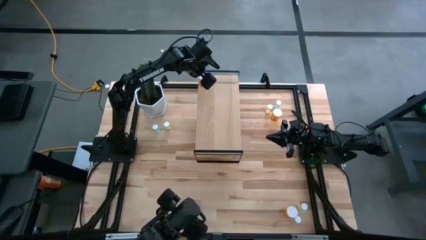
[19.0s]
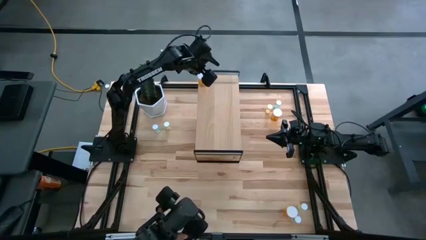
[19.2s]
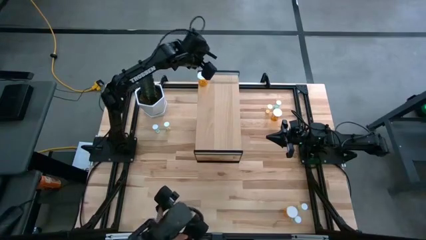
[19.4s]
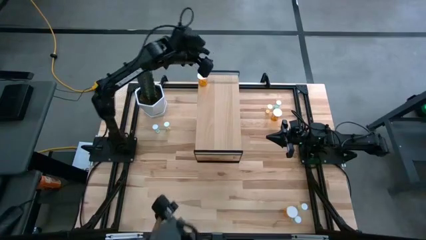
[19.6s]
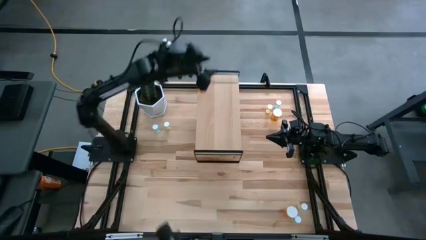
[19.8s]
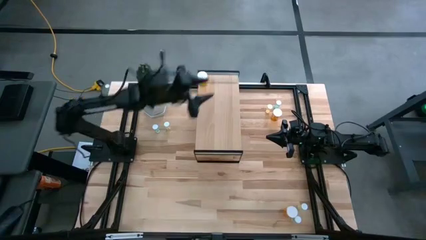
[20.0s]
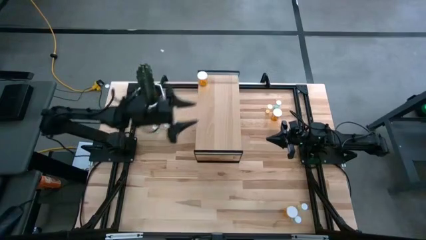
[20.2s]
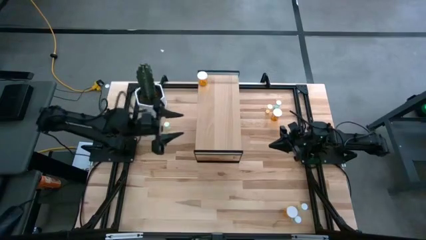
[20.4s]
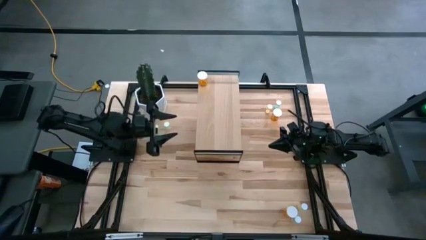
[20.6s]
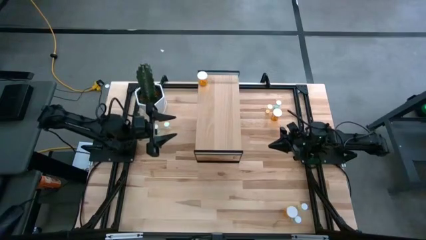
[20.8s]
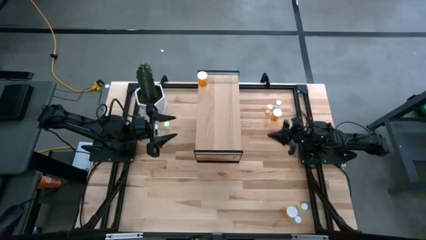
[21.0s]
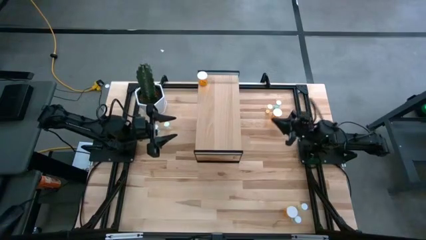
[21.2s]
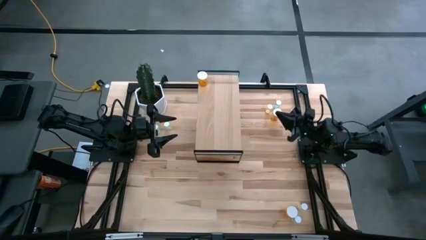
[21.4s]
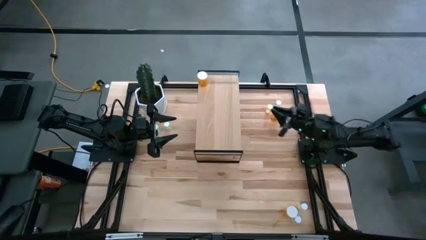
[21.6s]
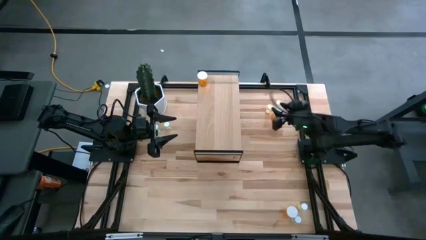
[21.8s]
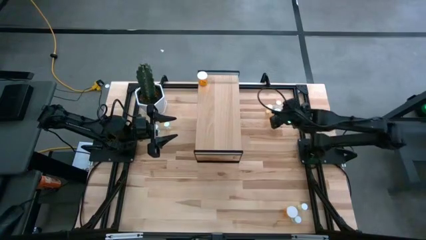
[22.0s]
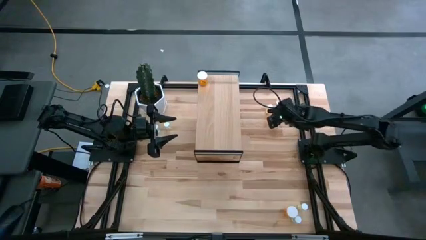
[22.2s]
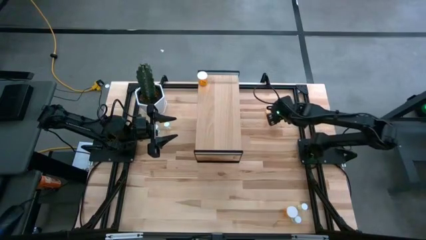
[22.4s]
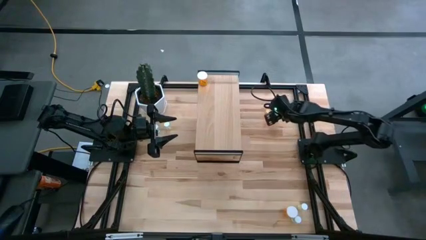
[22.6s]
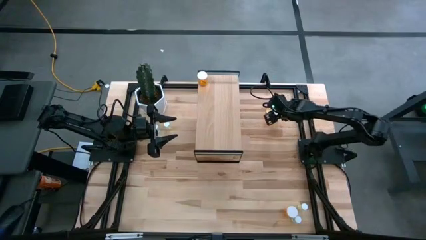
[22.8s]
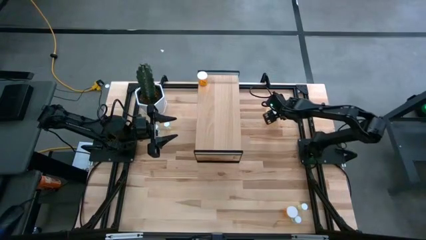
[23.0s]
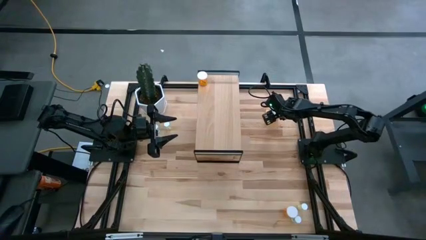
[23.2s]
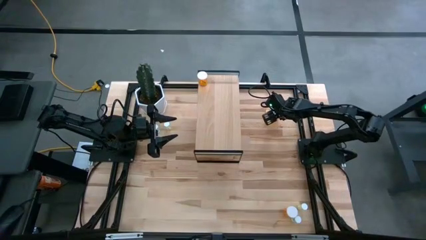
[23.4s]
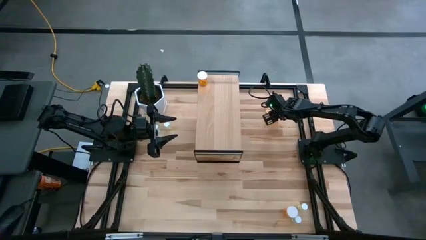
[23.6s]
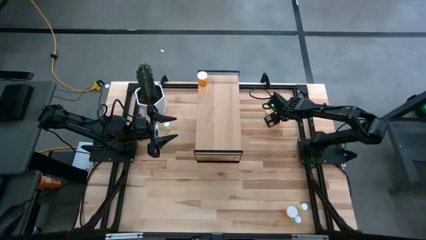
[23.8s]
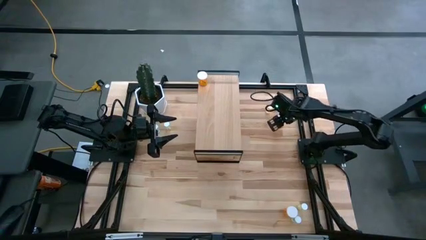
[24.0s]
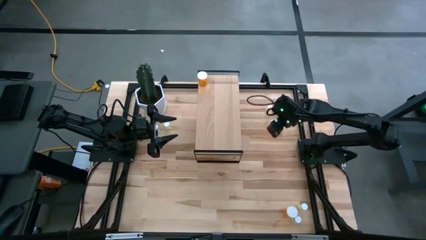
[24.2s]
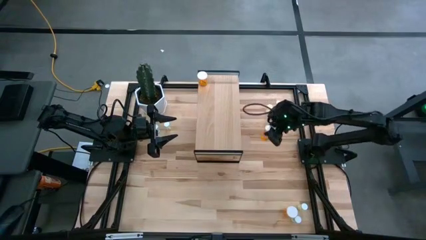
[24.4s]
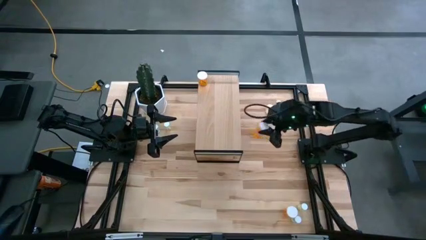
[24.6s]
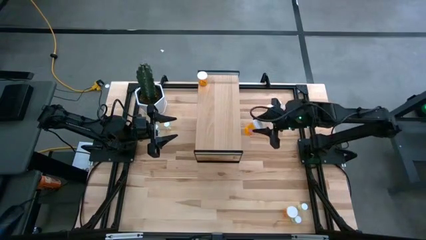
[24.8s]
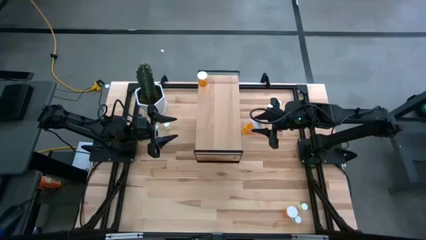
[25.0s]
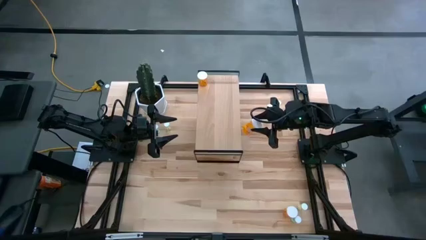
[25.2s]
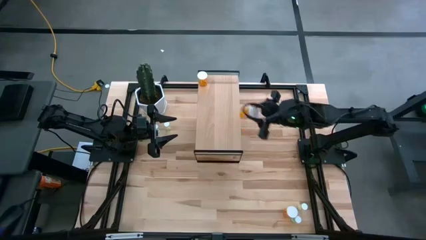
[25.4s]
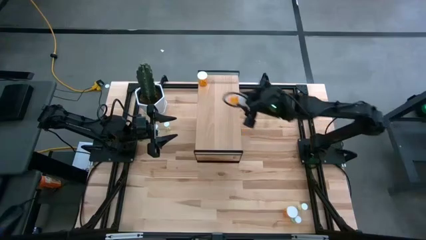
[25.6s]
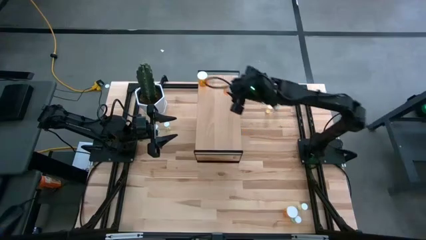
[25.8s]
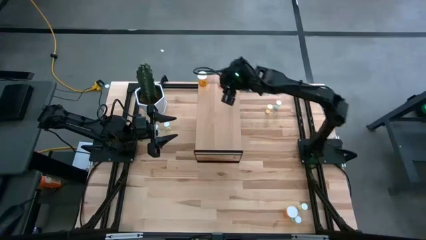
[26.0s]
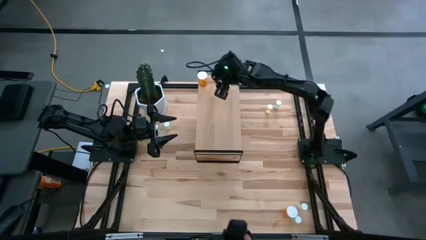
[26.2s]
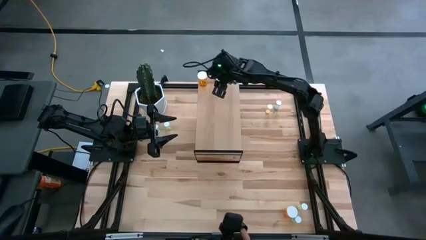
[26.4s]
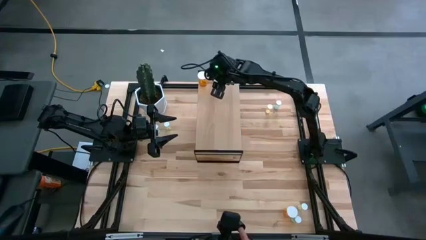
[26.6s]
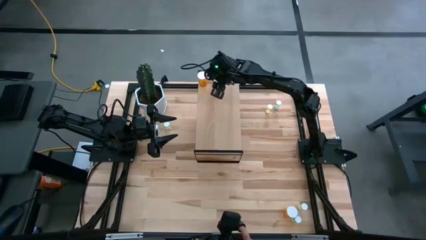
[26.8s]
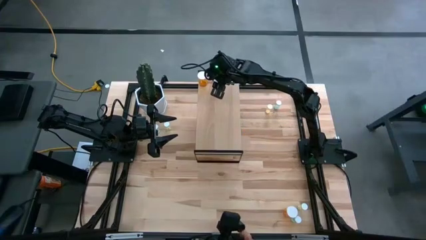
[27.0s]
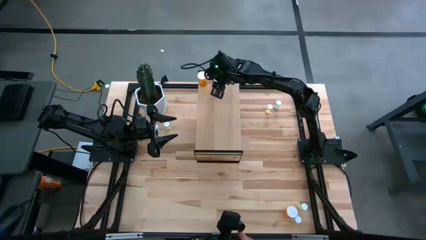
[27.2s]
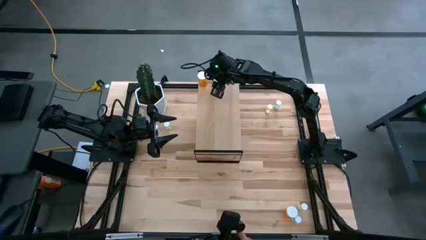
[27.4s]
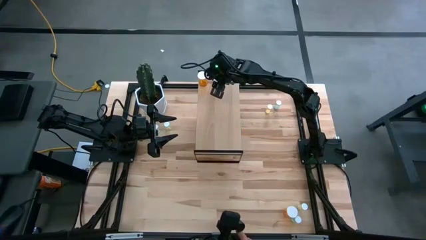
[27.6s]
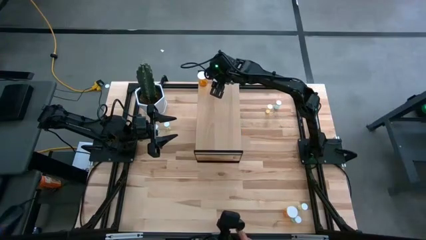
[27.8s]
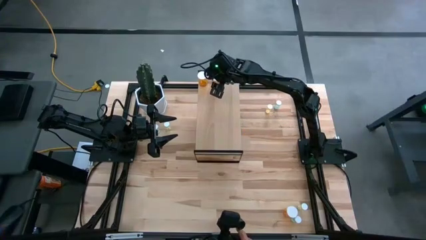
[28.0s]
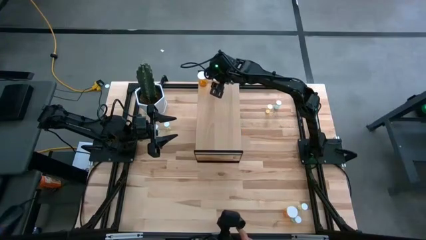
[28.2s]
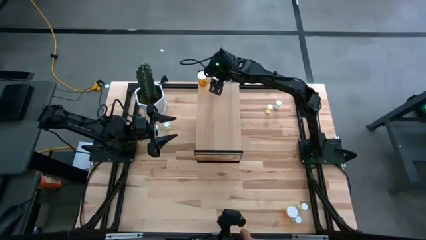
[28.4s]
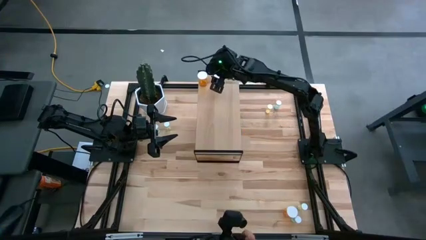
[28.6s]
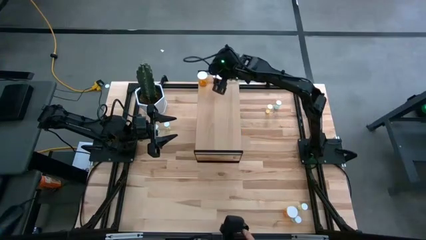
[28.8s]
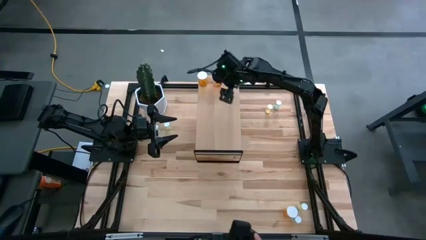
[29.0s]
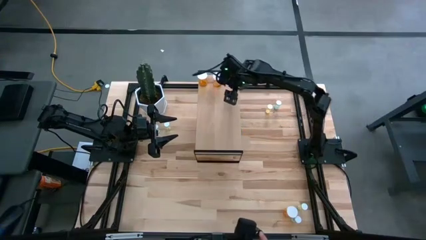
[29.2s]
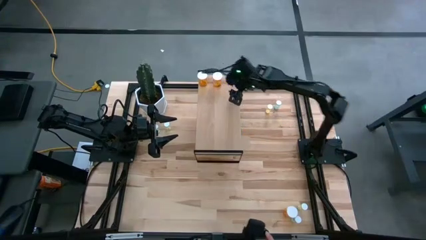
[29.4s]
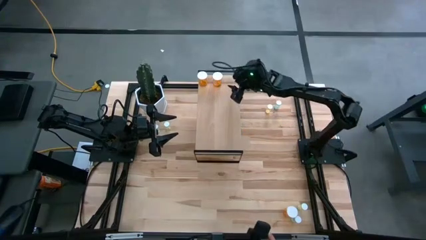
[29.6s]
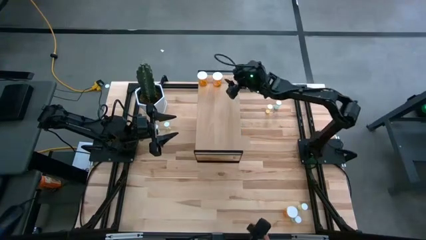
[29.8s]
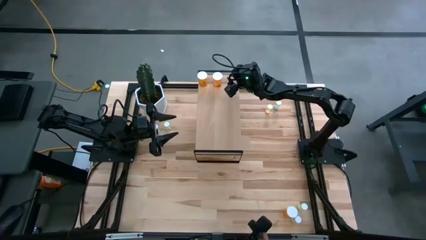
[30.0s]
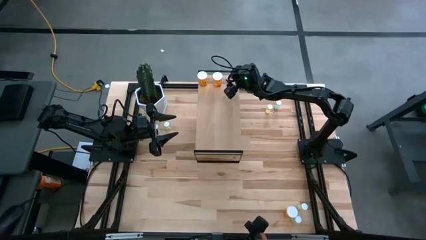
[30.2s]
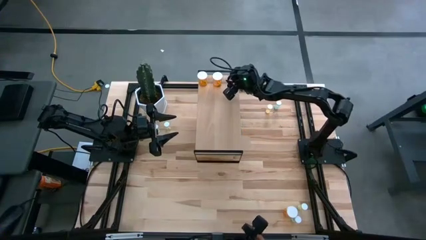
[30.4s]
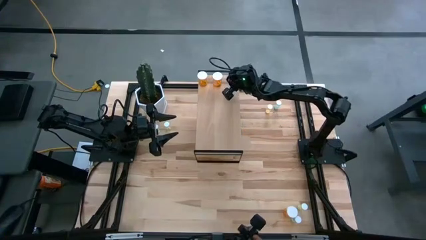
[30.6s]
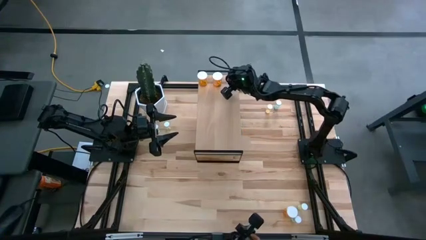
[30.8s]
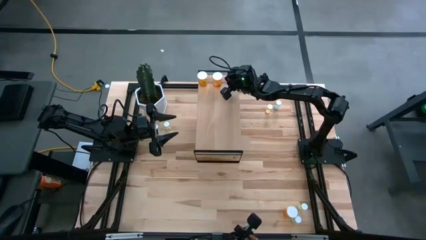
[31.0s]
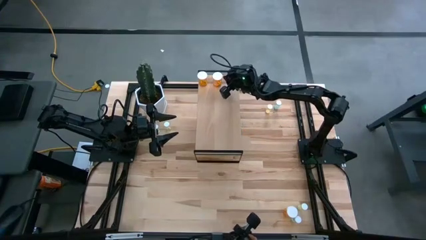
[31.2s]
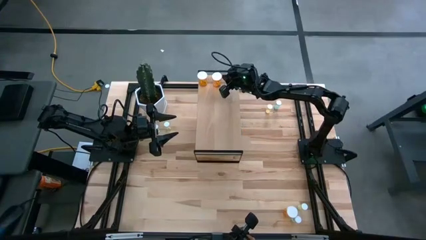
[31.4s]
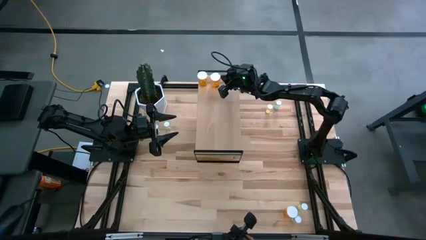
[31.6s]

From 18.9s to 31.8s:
Task: Pick and place medicine bottles onto shelf by color
Put the top orange pill bottle on the shelf aligned with the other orange pill bottle

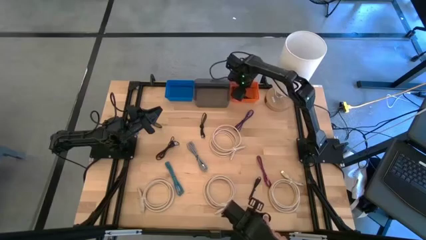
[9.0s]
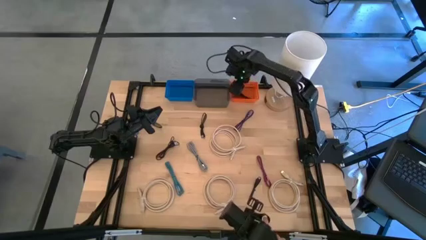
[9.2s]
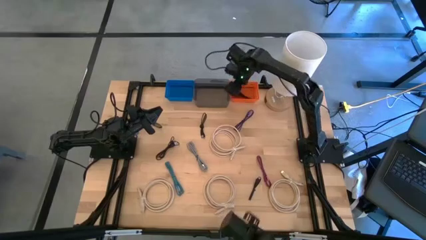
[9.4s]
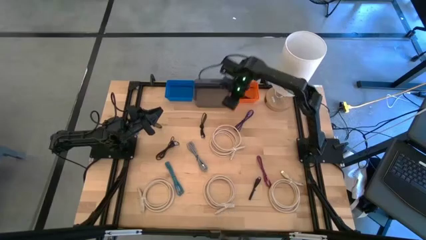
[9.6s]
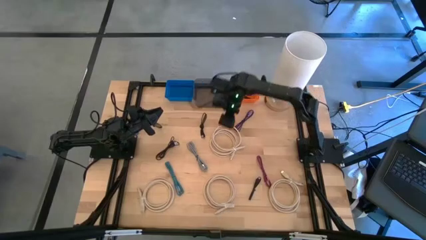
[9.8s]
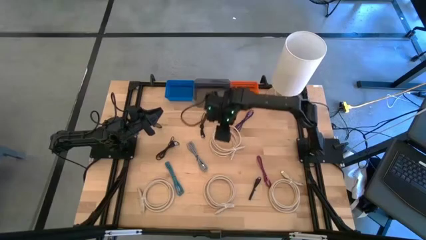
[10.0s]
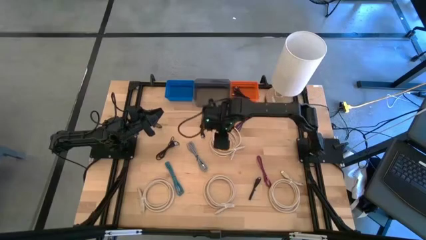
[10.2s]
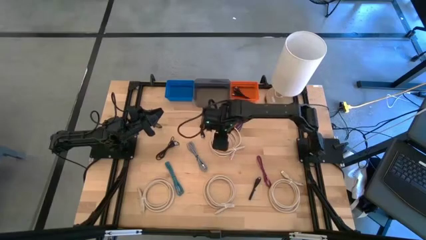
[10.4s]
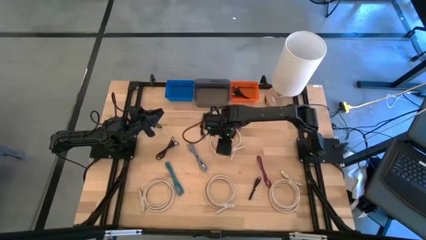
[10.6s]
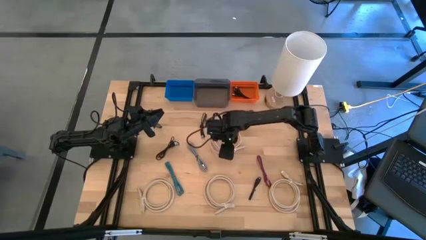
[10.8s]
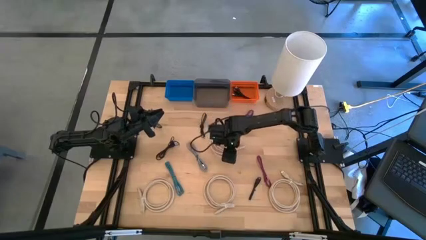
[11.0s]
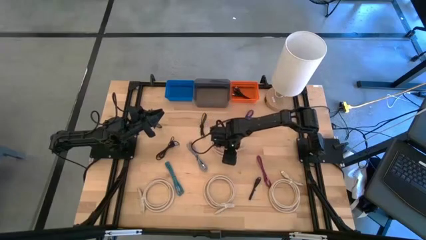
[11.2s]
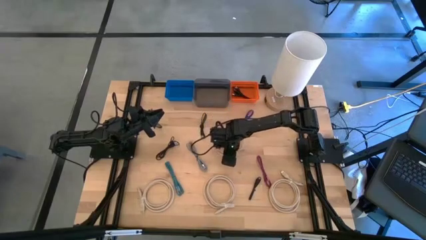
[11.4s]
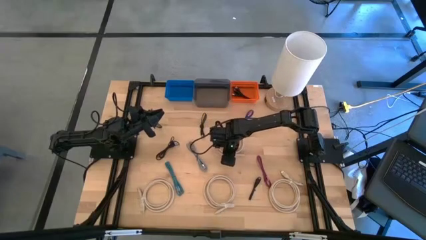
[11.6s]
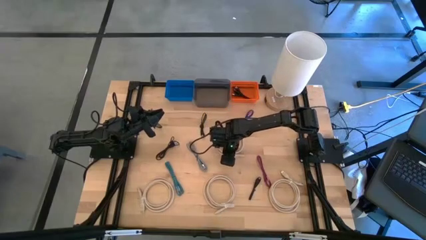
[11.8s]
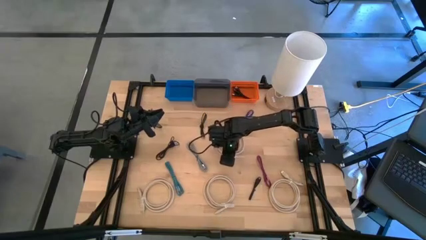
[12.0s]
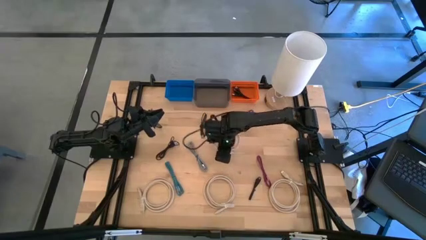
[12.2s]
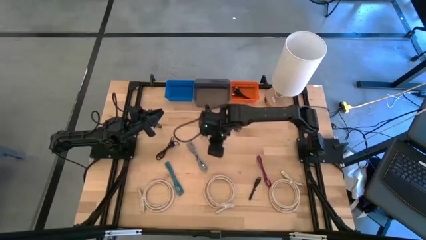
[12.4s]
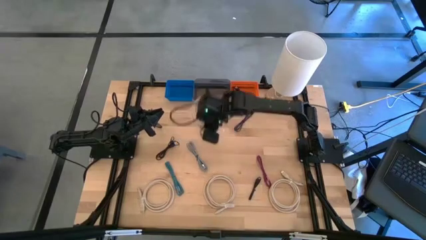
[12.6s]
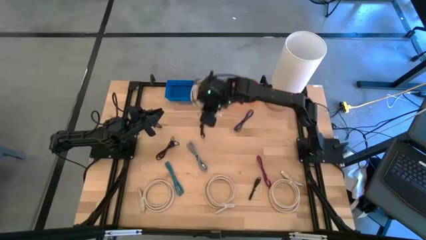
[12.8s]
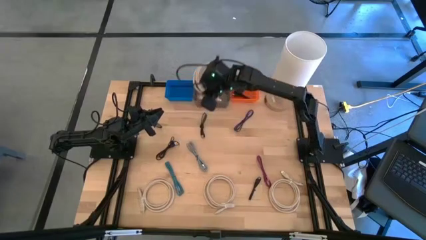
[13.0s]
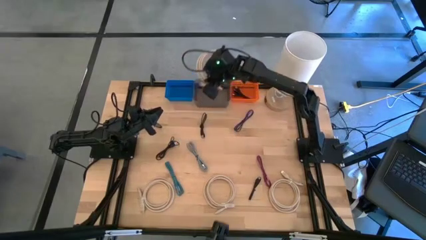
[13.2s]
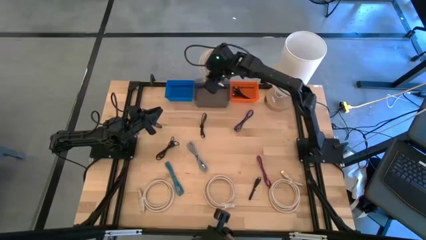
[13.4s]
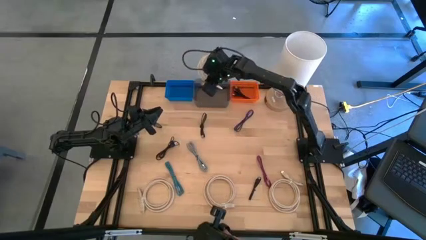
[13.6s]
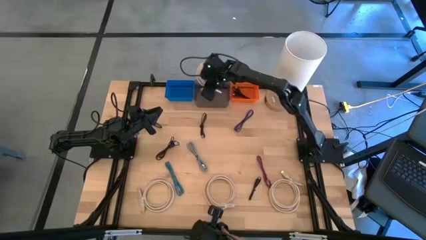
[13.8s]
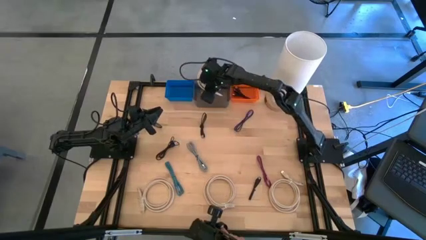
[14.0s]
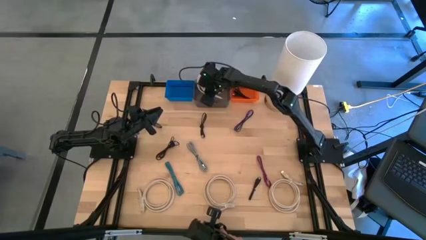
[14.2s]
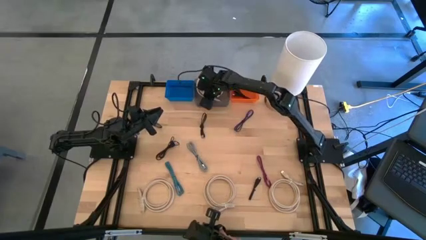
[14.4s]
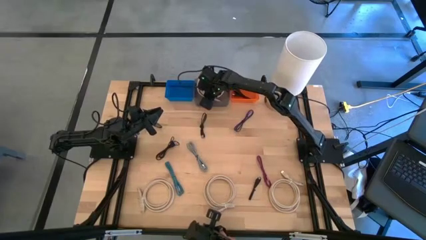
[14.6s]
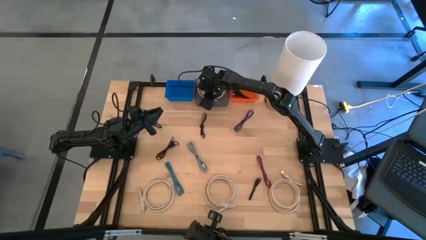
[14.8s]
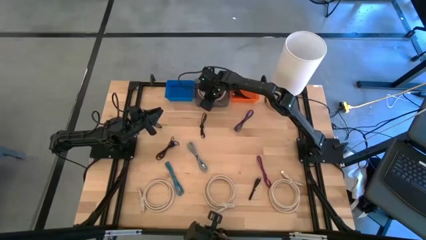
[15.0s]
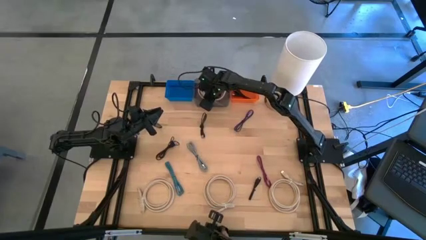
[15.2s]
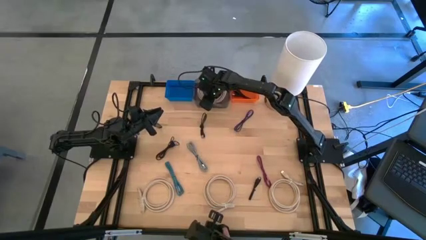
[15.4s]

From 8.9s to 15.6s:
Task: Pick & Place USB Port
Put the brown HDMI cable into the black bin
